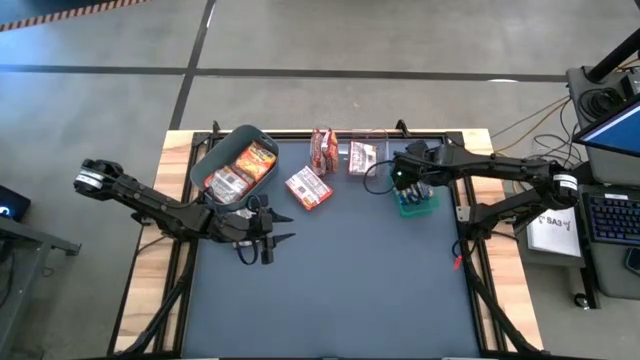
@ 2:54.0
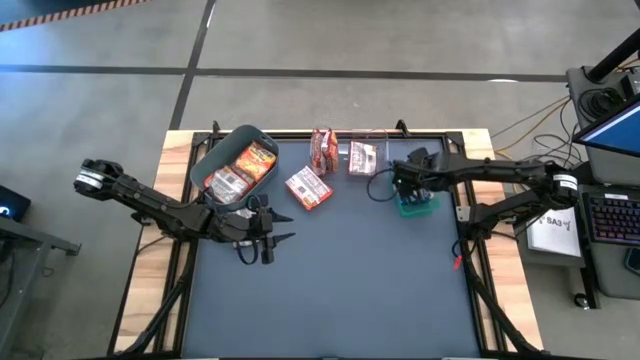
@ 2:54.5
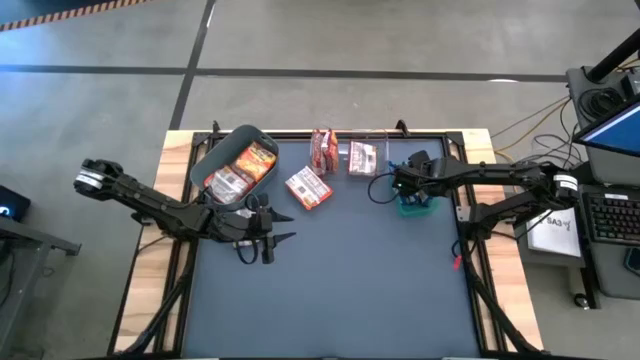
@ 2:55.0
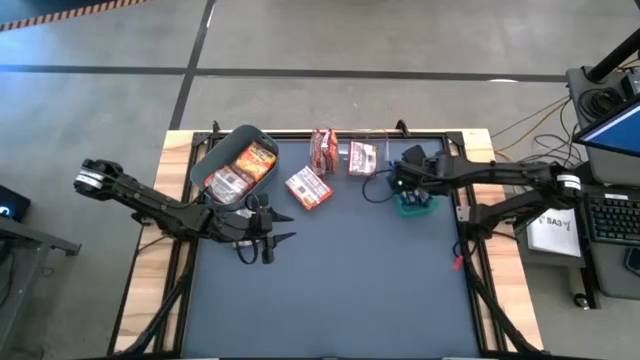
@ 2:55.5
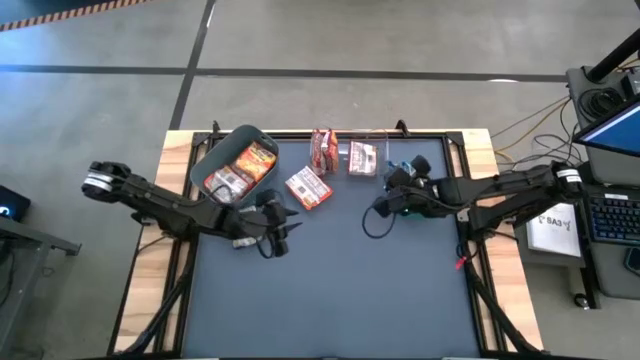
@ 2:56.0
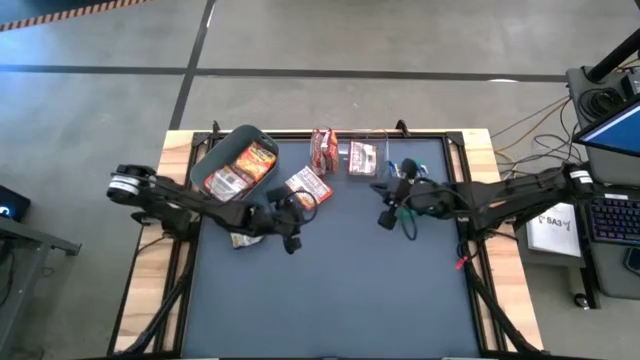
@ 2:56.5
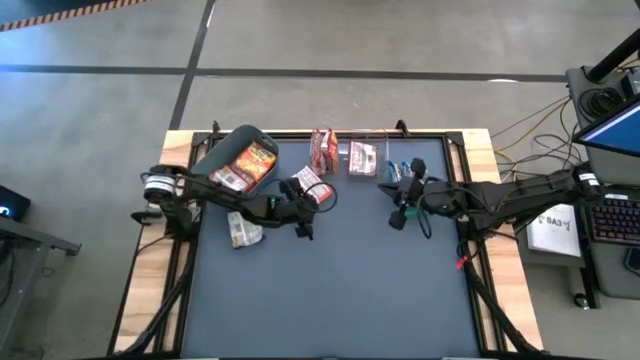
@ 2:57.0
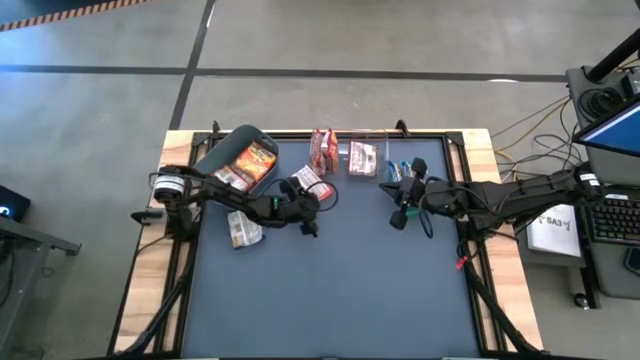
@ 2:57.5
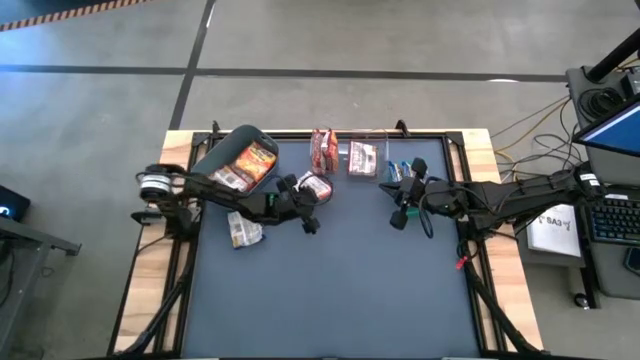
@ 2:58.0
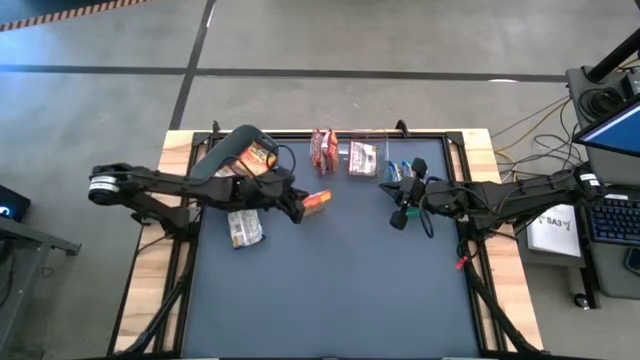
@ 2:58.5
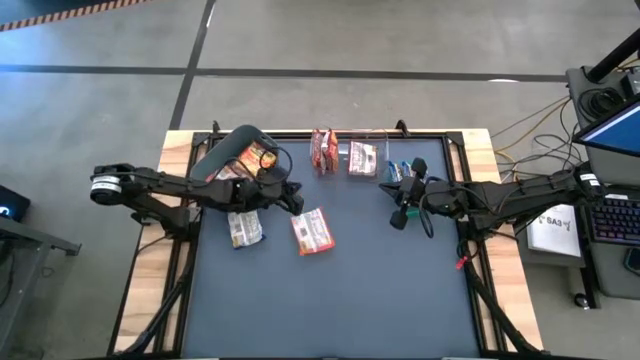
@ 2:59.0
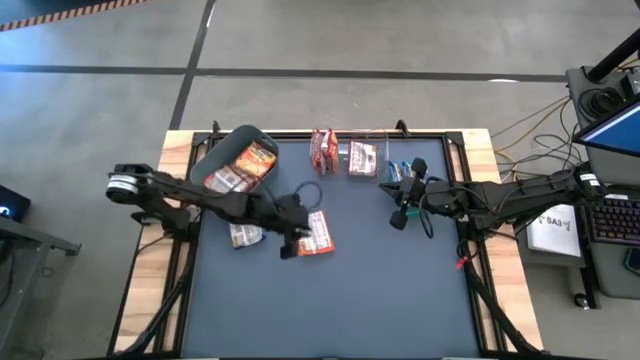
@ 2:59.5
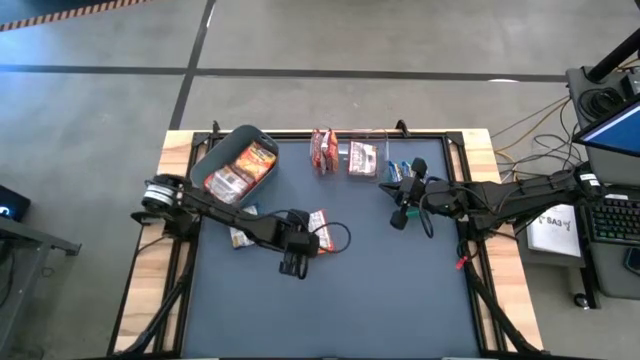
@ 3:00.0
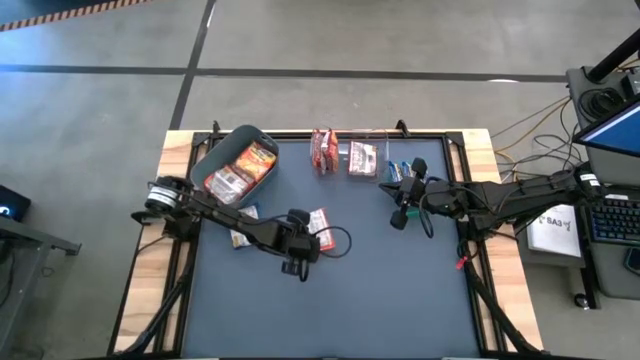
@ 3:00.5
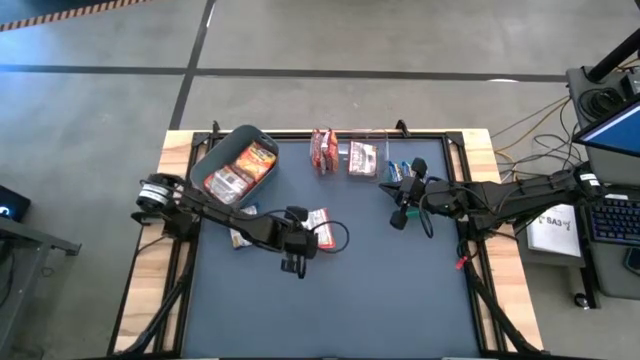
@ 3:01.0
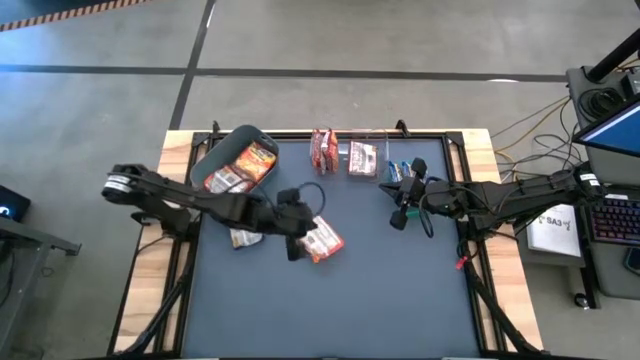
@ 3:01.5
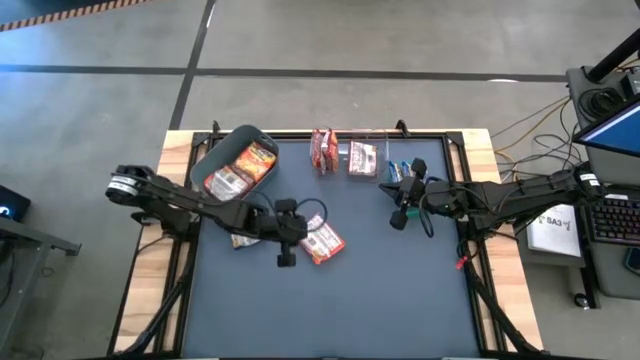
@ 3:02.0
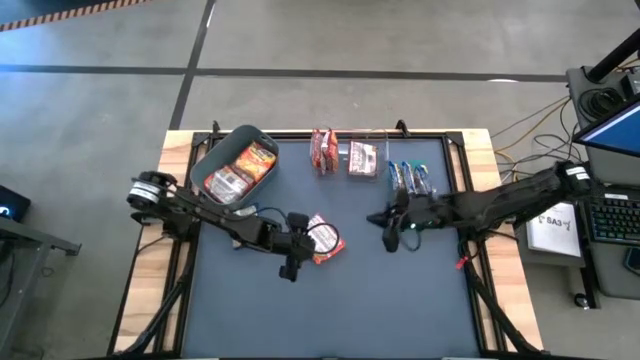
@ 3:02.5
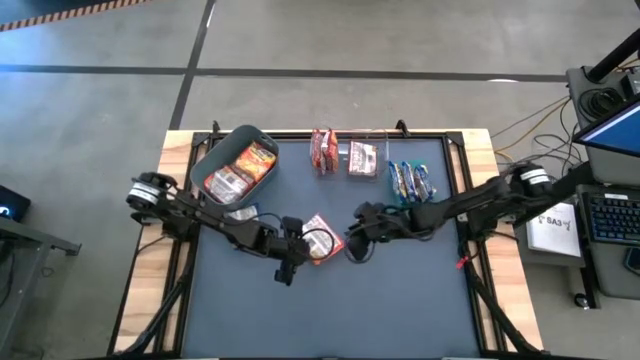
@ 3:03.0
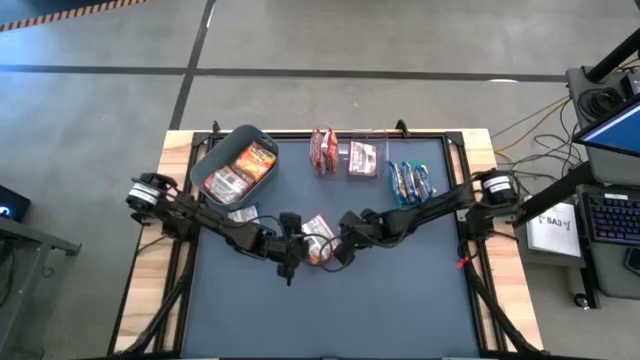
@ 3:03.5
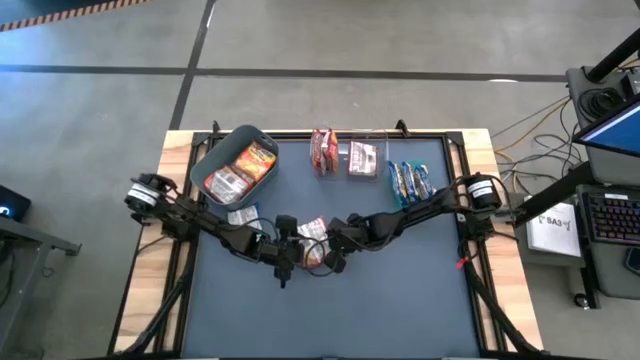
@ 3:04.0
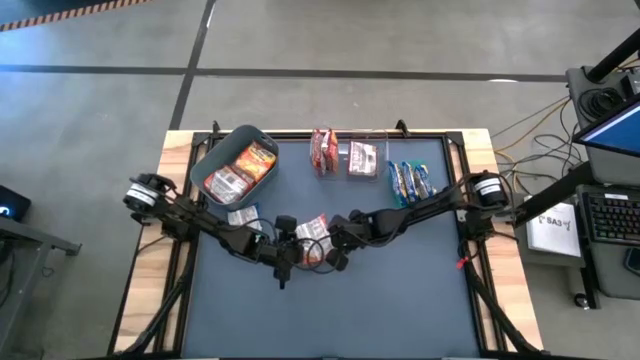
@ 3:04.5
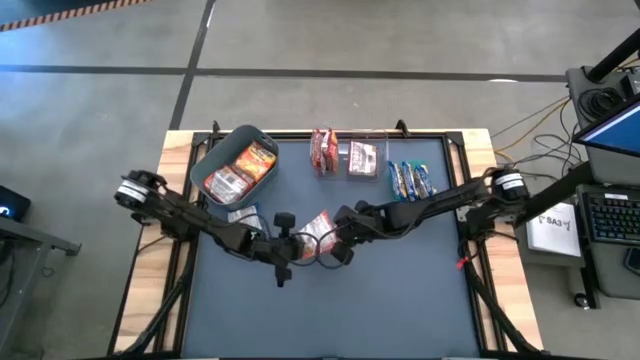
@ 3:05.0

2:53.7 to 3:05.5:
Task: Sort Maruchan noodles
Put the orange noodle pack into the gray bin

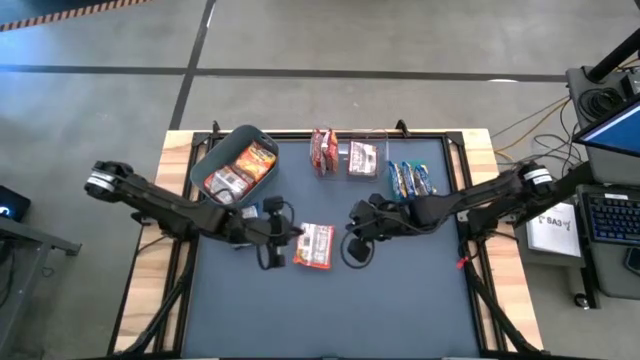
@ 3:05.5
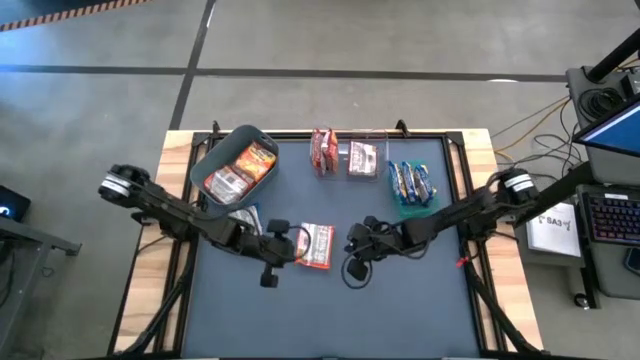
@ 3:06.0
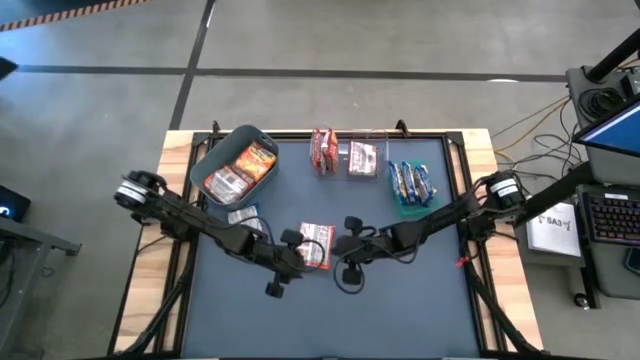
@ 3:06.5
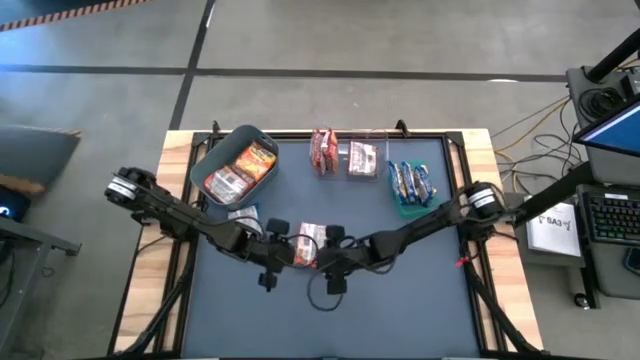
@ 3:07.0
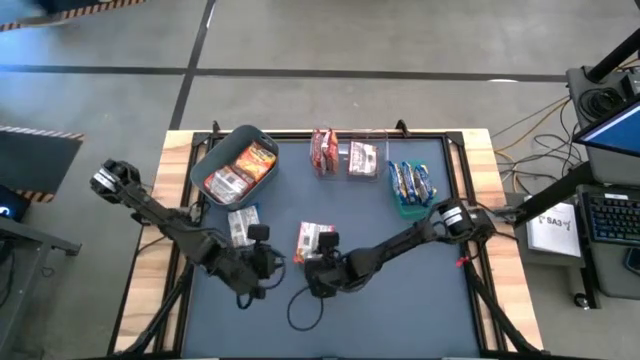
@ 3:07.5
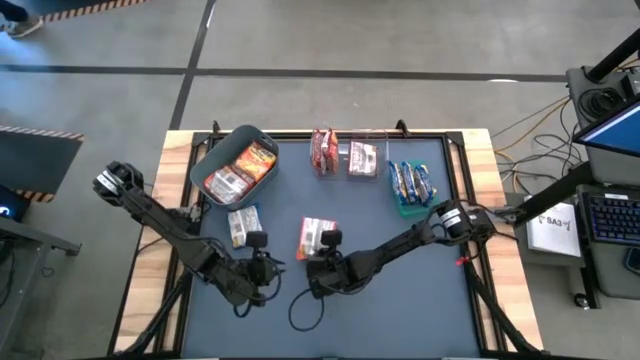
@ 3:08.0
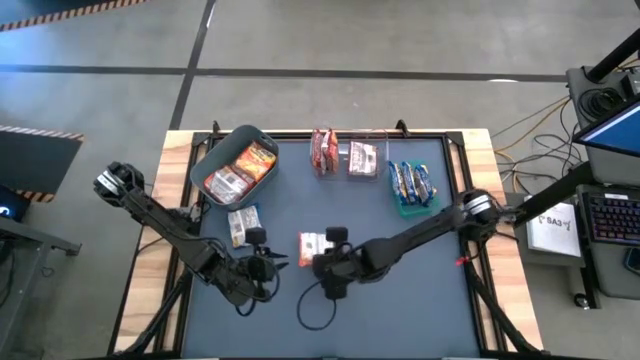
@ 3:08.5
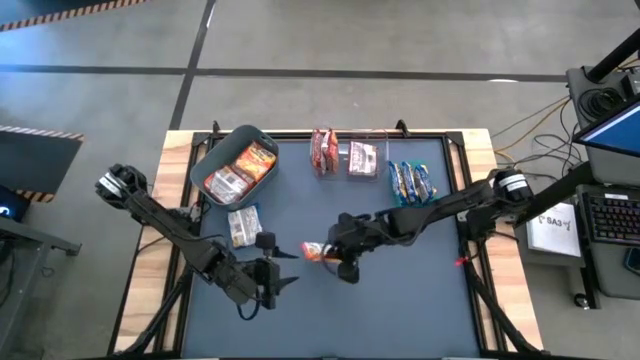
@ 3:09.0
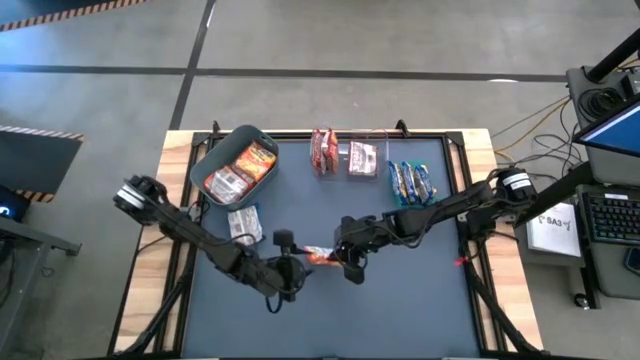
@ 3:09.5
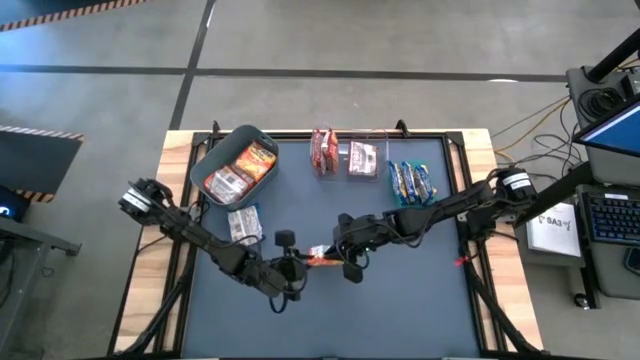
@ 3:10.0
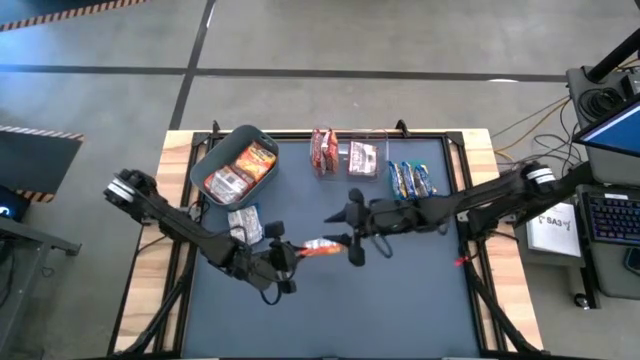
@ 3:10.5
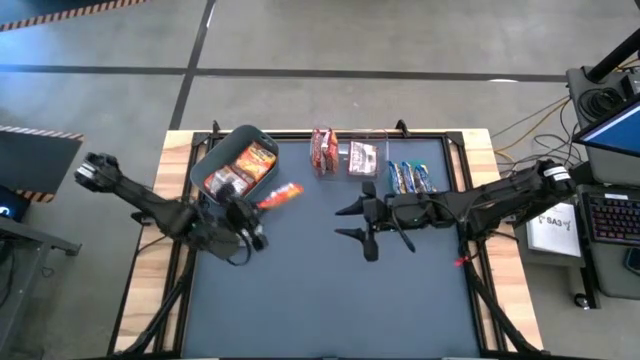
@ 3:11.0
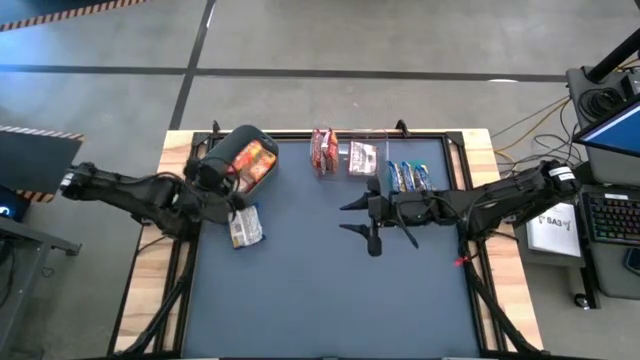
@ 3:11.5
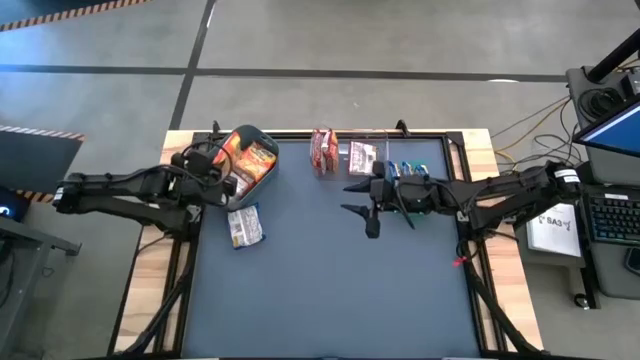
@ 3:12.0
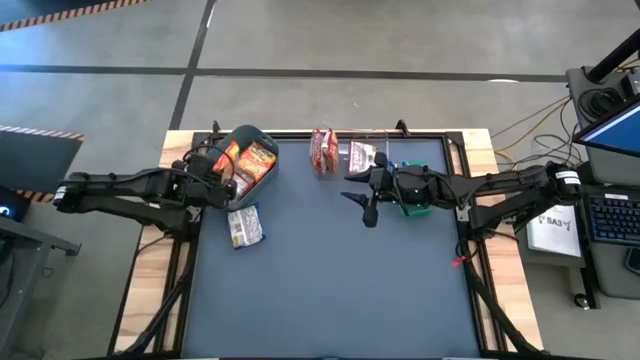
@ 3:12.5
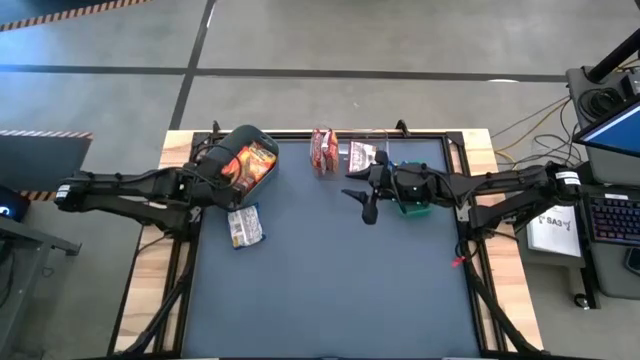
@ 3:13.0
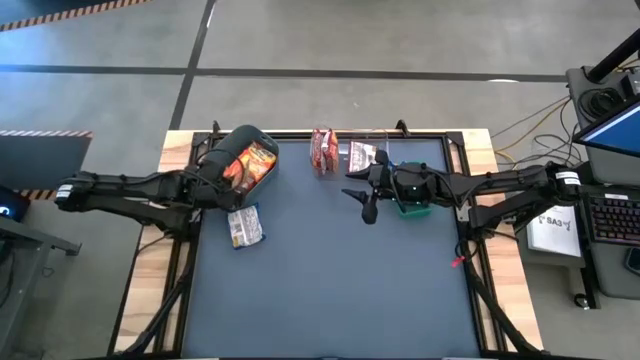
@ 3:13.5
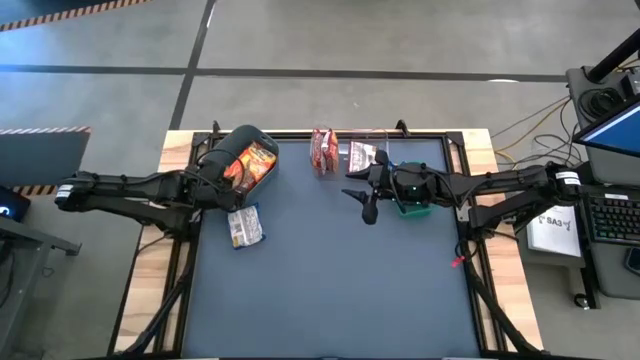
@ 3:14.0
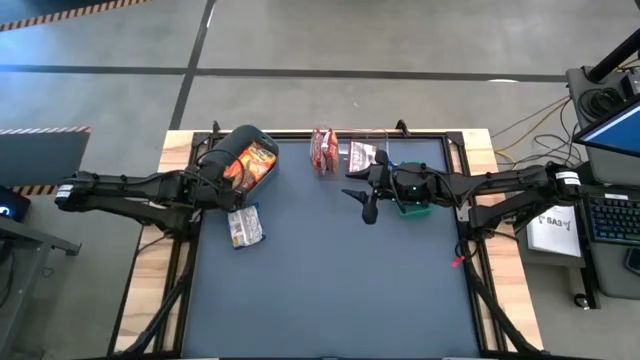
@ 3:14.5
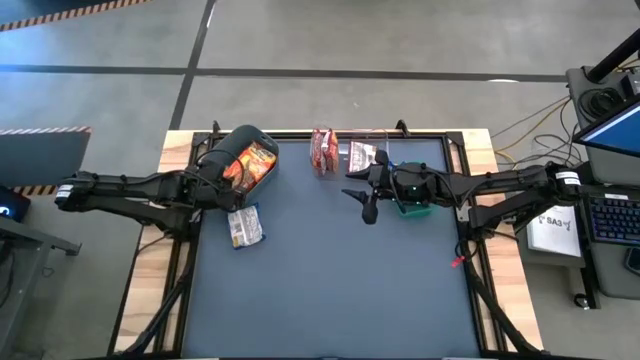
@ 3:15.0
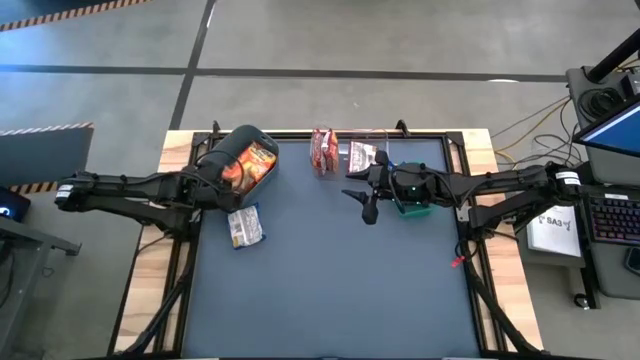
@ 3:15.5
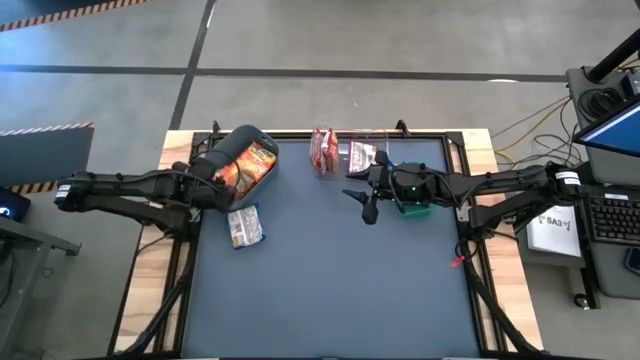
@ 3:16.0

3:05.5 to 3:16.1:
Put the orange noodle pack into the gray bin
